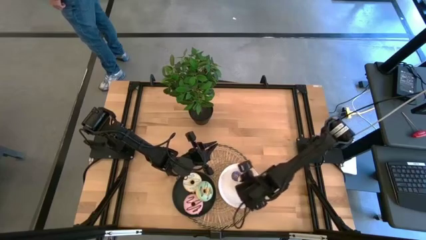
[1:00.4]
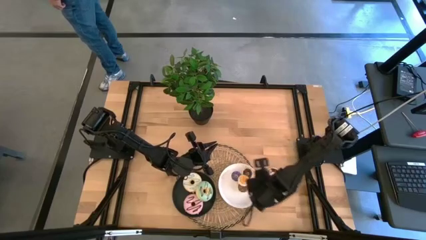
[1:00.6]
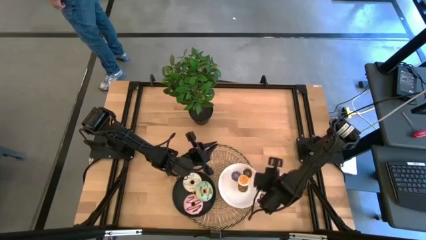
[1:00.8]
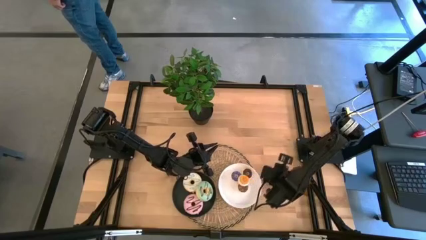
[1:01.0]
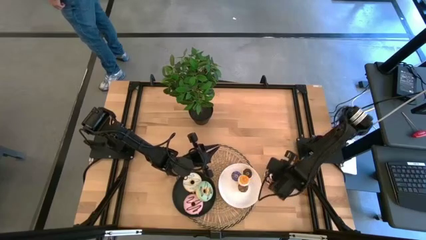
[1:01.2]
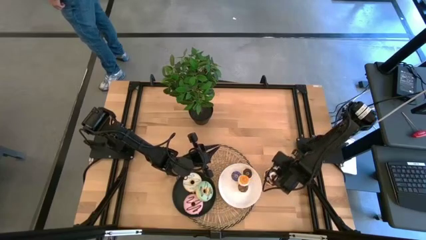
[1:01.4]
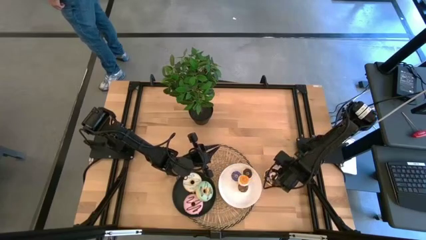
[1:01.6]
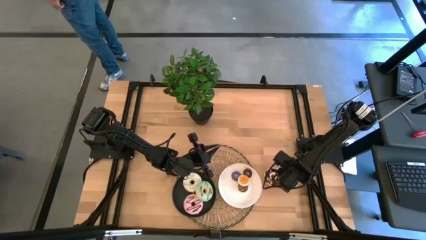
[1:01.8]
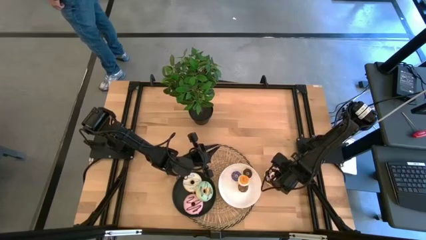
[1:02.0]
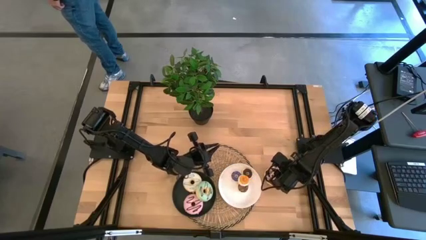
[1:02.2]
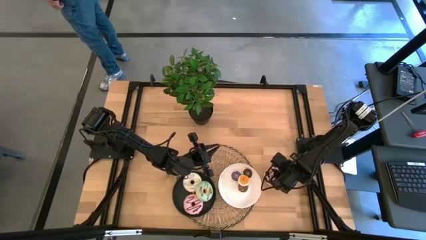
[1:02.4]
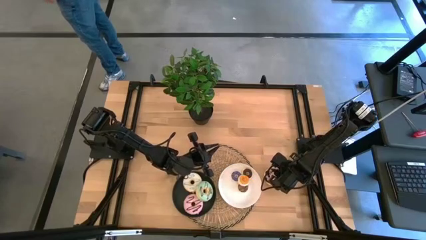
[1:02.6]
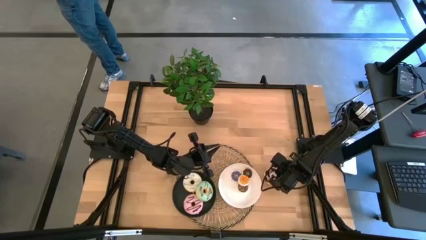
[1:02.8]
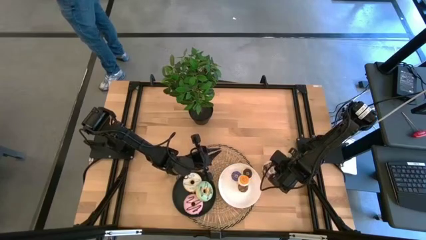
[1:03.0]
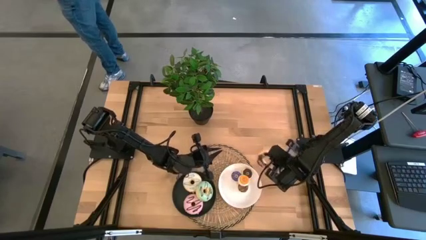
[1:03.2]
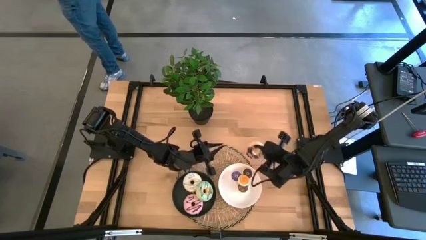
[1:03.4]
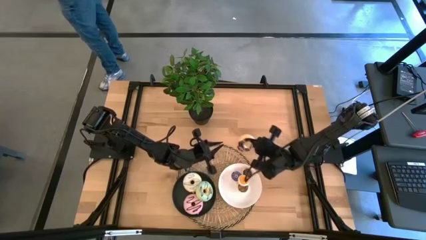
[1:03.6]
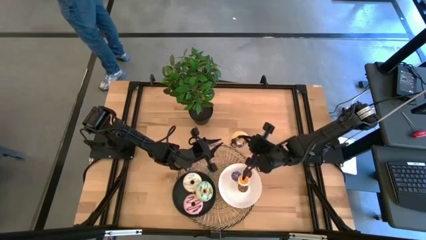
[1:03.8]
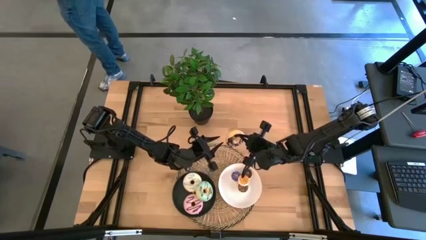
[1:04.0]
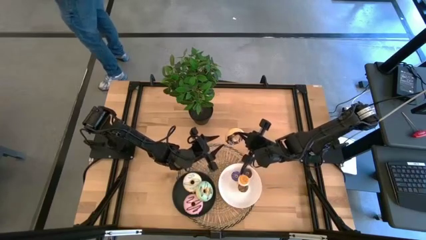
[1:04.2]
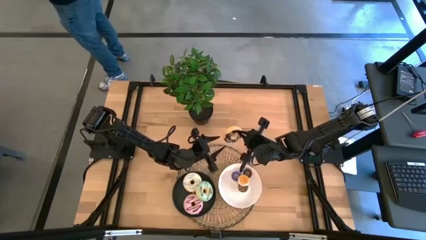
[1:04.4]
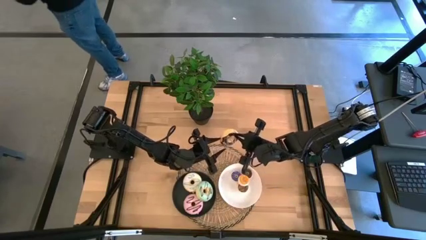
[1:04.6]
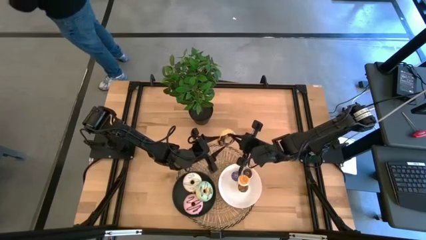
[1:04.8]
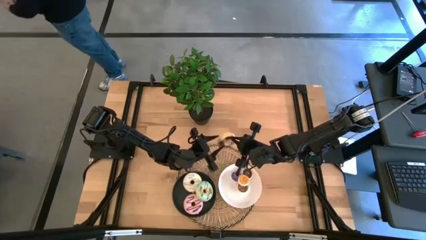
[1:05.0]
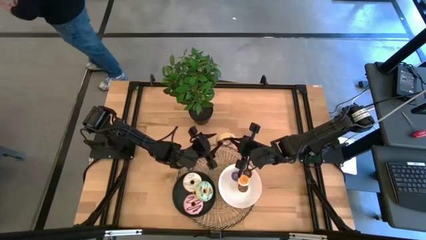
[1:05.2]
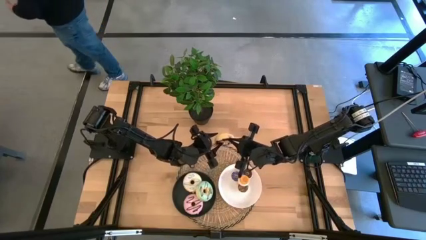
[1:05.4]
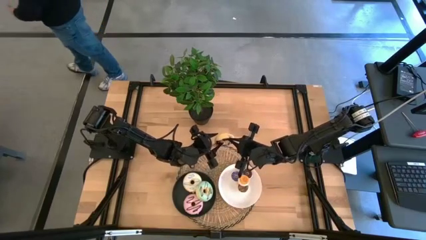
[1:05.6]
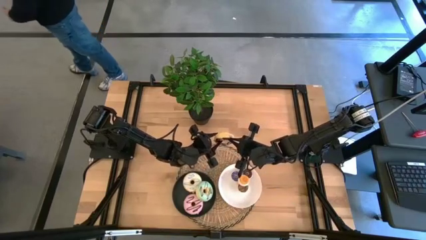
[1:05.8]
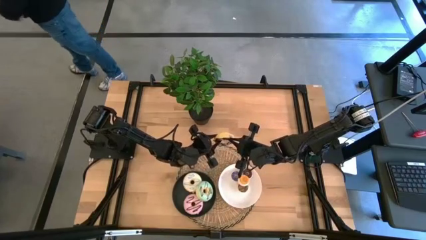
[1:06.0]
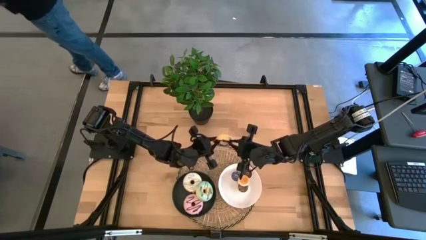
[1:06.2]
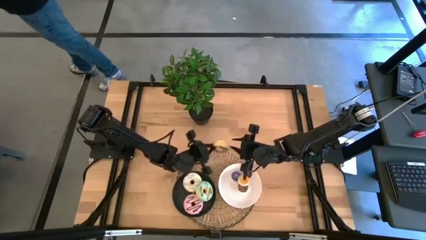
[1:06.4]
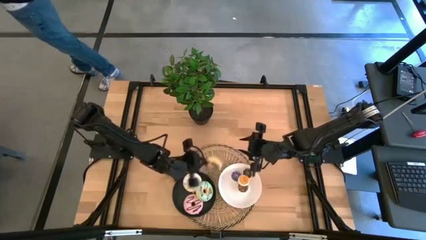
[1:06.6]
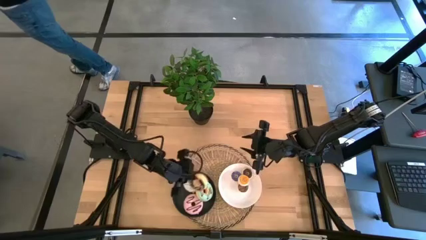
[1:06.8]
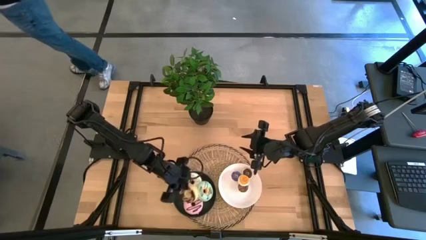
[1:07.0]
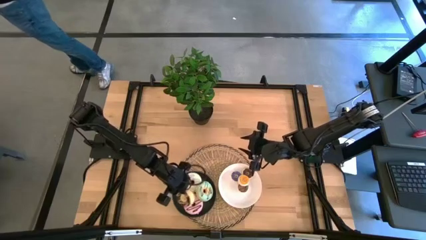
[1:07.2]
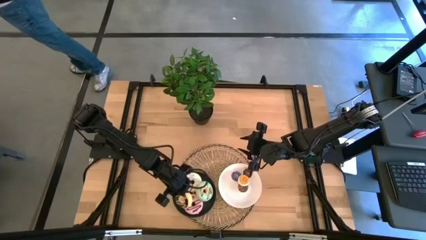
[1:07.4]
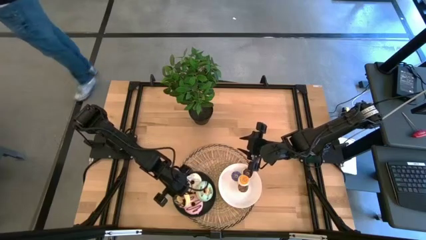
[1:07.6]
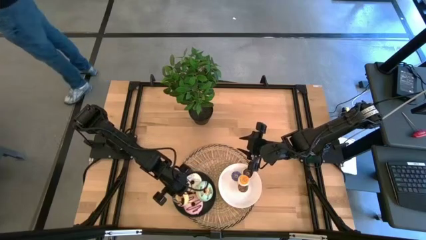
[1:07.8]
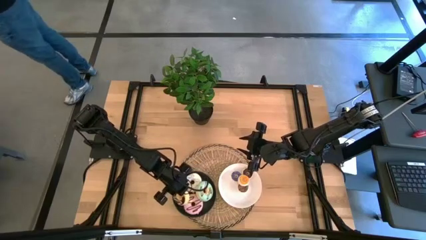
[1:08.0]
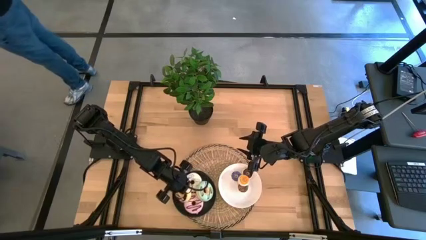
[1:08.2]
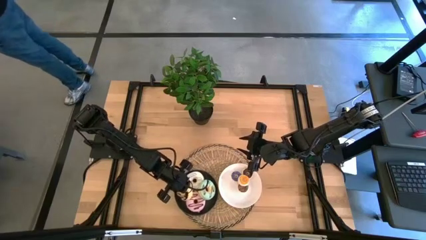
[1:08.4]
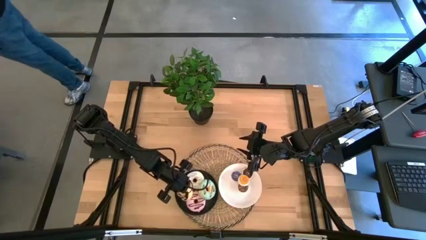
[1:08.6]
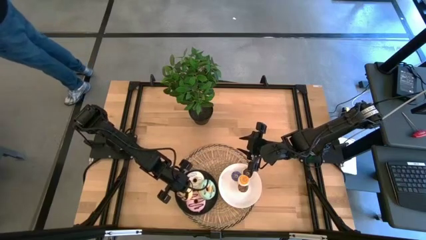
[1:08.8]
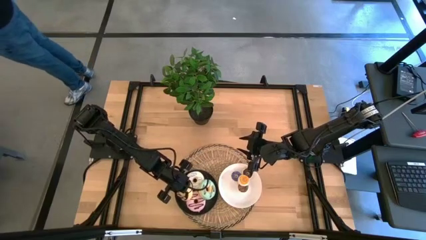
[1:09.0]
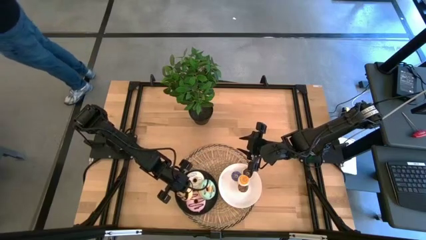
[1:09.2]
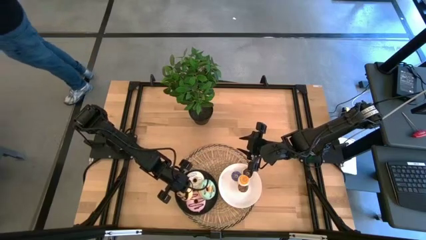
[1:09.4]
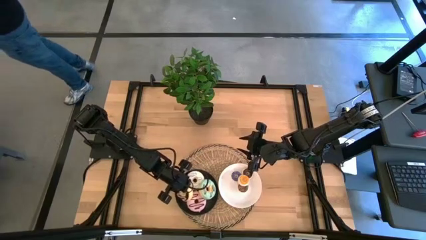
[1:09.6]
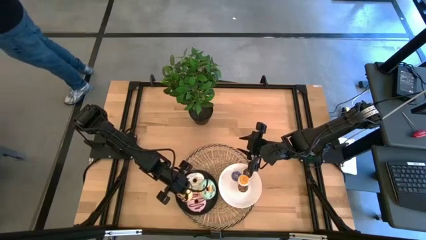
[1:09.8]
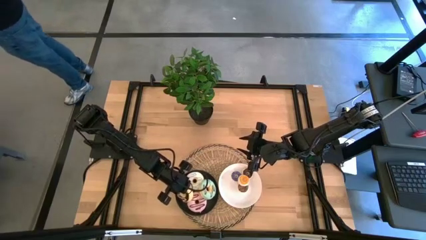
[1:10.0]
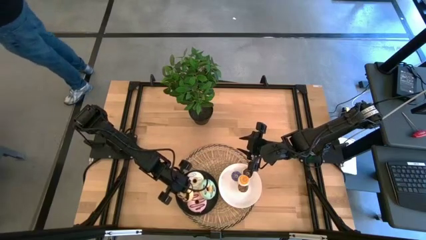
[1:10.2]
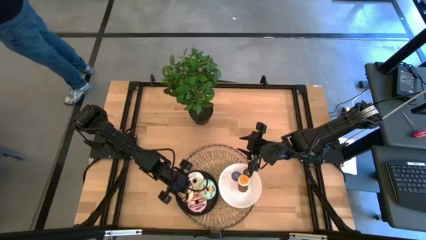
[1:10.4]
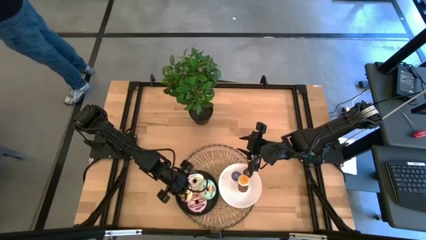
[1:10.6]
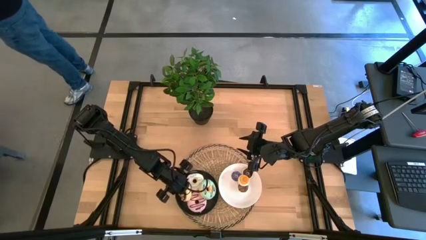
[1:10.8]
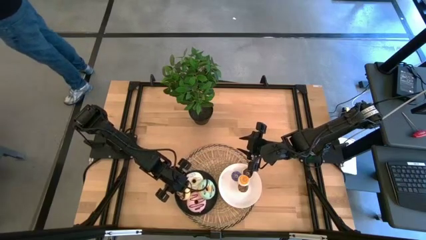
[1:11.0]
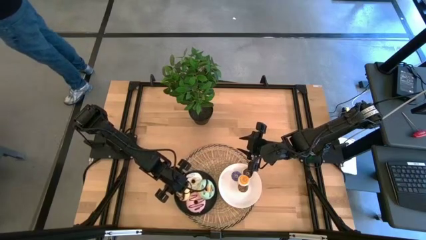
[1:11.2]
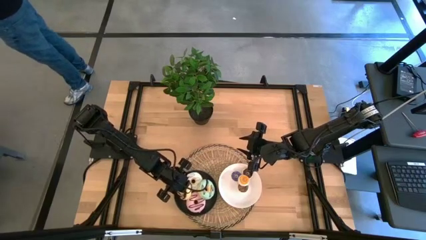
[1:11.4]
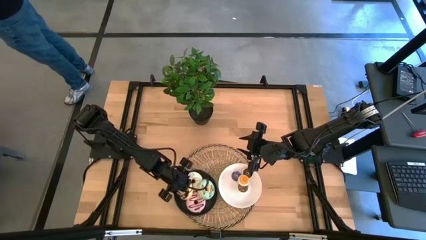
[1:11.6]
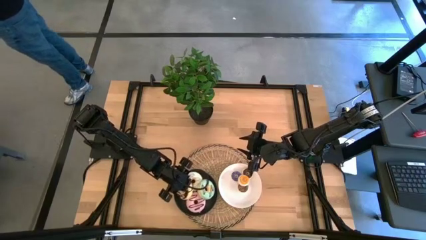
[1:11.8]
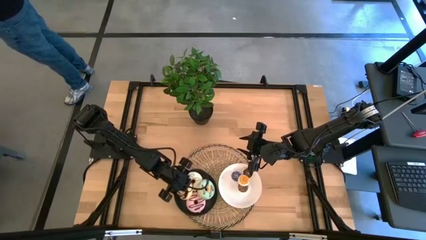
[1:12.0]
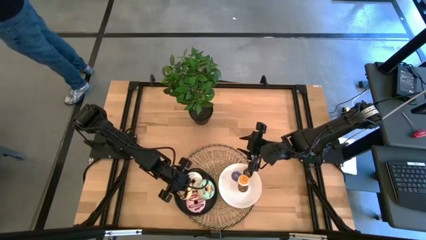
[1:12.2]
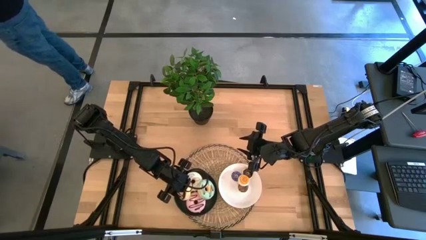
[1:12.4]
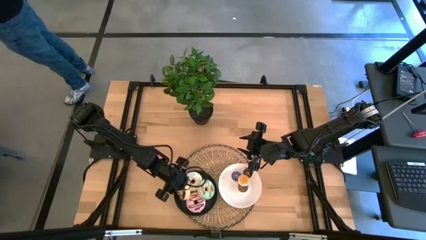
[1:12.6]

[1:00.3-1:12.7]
Task: Pick & Place donuts
Put the large black donut on the black plate
